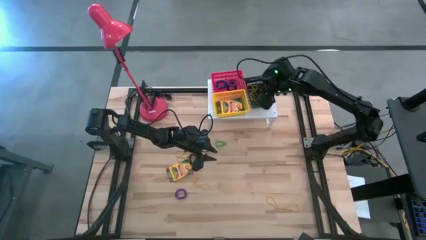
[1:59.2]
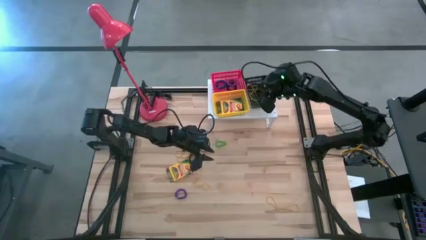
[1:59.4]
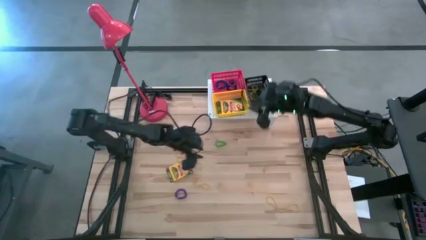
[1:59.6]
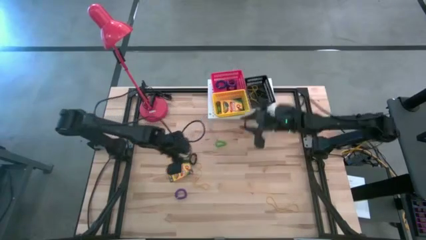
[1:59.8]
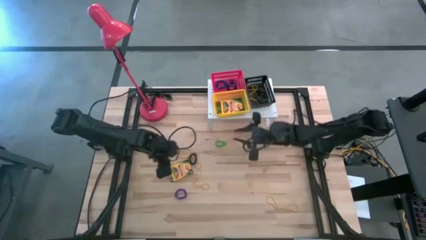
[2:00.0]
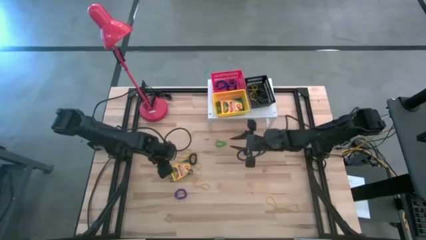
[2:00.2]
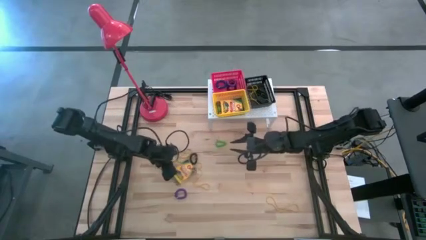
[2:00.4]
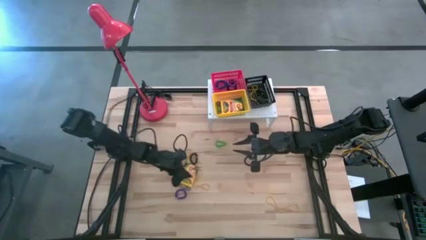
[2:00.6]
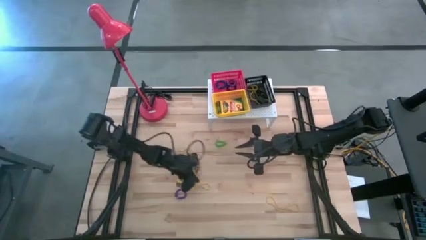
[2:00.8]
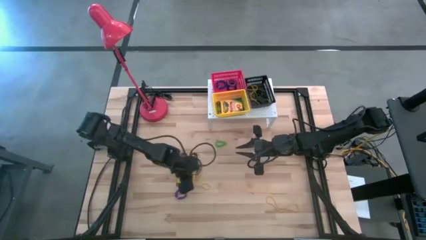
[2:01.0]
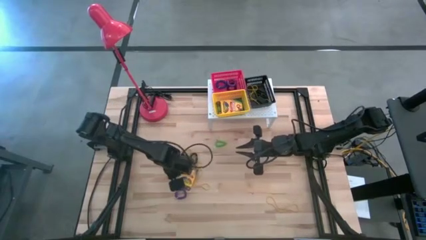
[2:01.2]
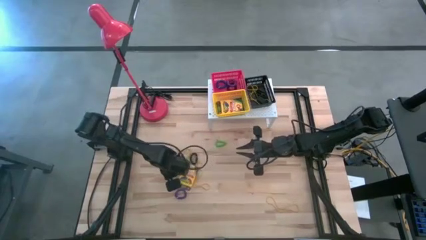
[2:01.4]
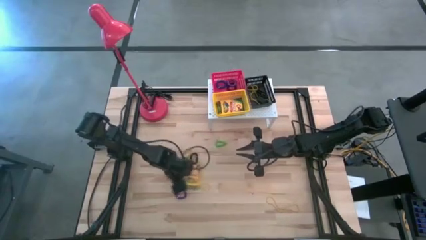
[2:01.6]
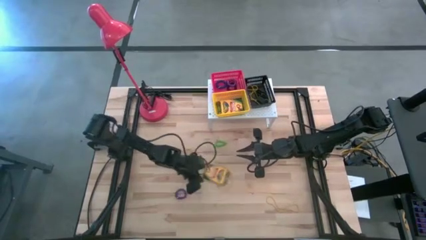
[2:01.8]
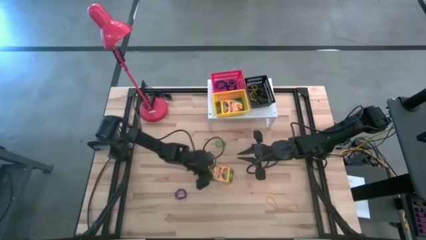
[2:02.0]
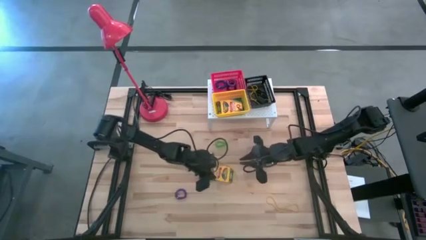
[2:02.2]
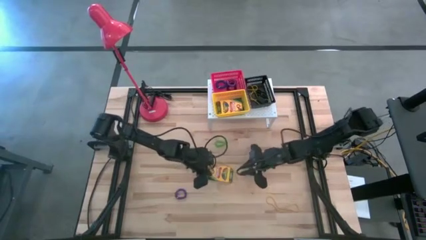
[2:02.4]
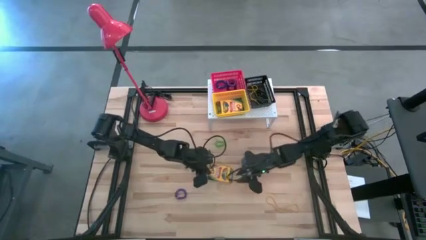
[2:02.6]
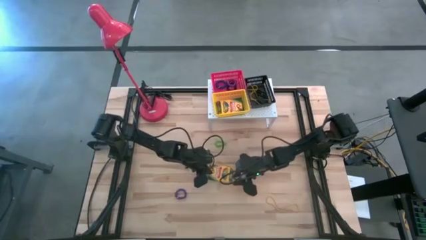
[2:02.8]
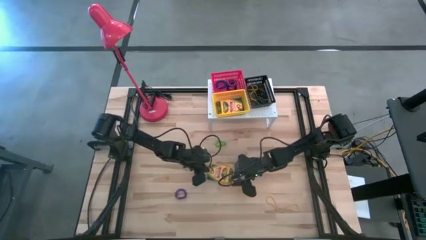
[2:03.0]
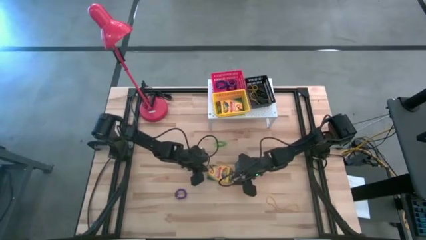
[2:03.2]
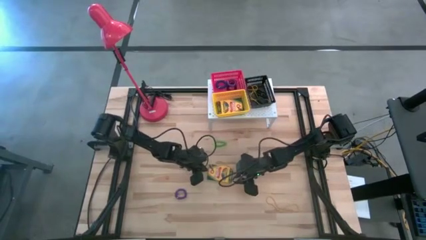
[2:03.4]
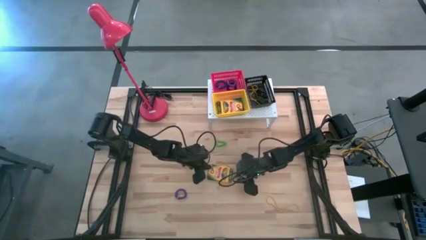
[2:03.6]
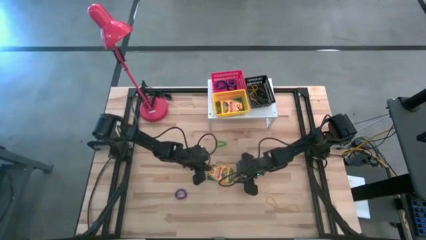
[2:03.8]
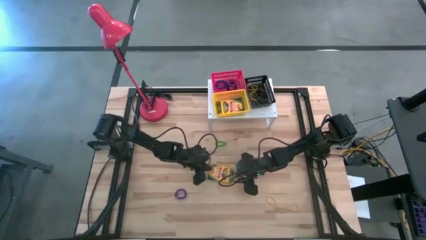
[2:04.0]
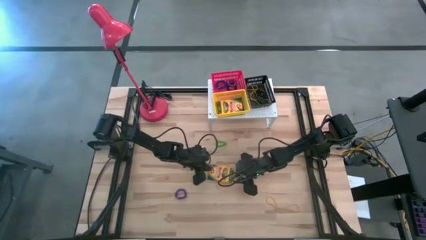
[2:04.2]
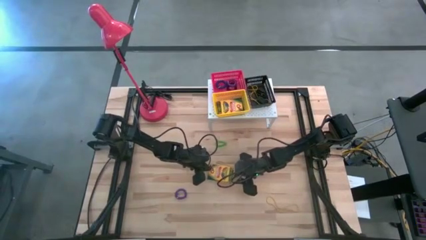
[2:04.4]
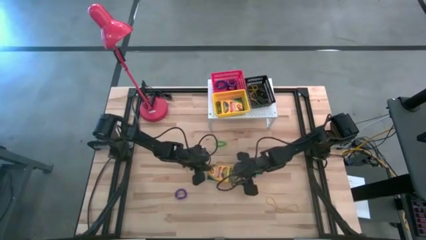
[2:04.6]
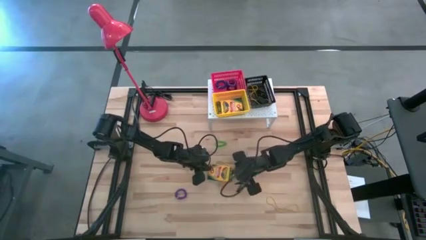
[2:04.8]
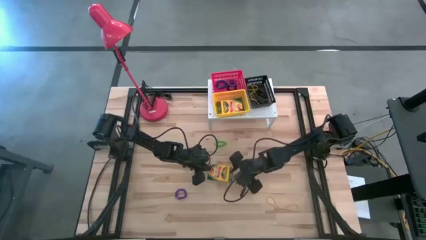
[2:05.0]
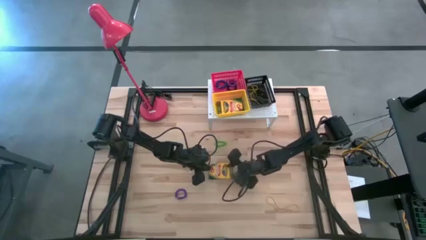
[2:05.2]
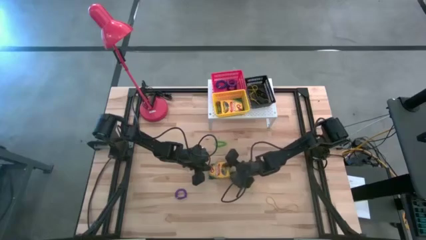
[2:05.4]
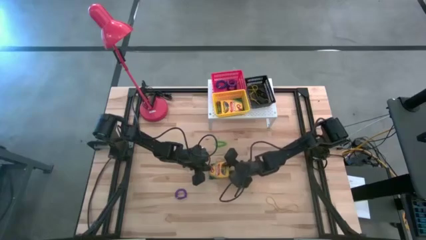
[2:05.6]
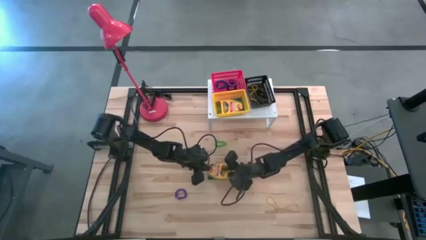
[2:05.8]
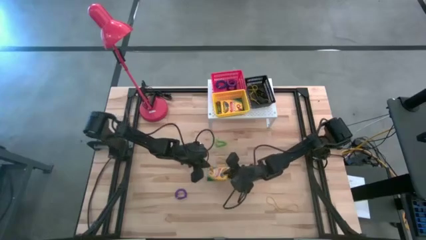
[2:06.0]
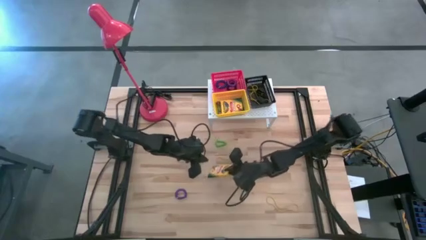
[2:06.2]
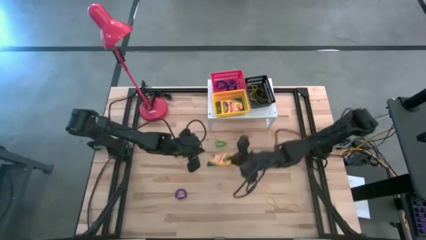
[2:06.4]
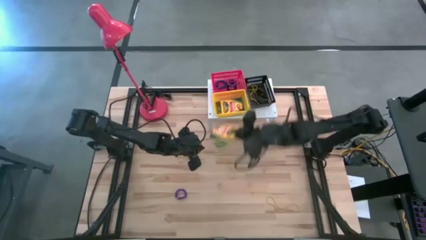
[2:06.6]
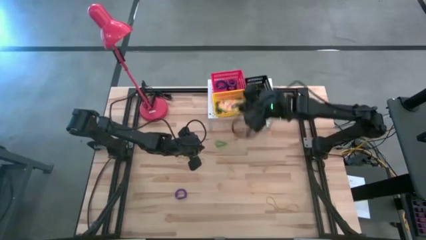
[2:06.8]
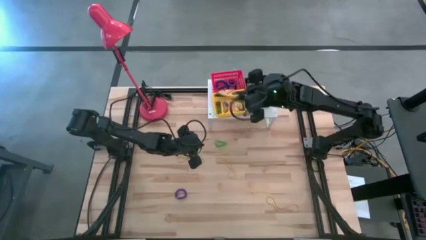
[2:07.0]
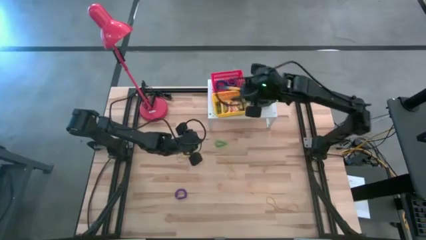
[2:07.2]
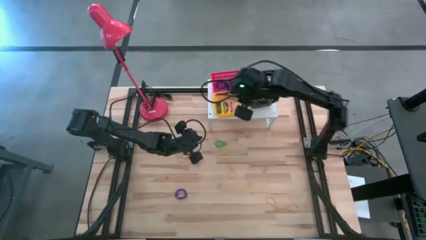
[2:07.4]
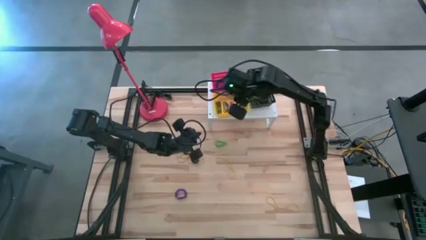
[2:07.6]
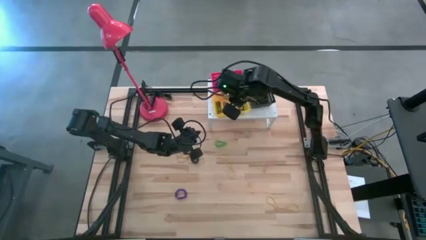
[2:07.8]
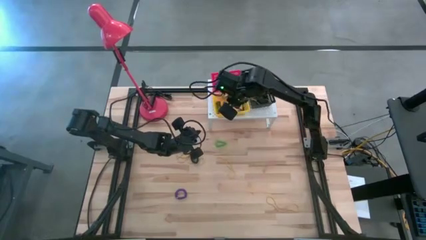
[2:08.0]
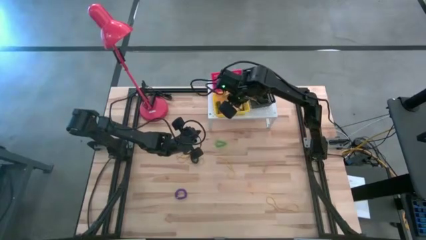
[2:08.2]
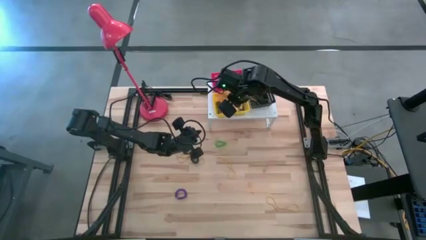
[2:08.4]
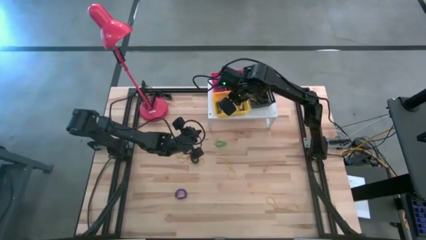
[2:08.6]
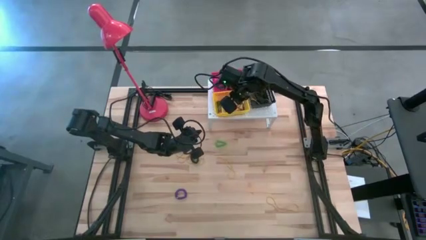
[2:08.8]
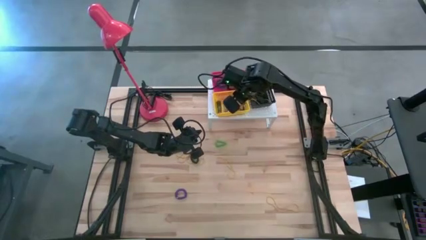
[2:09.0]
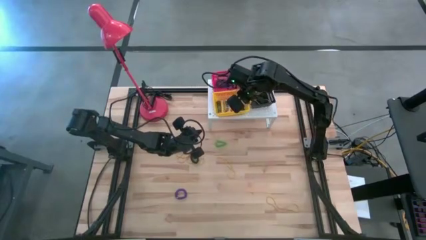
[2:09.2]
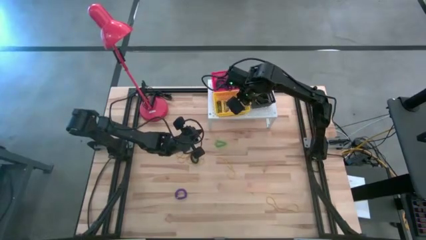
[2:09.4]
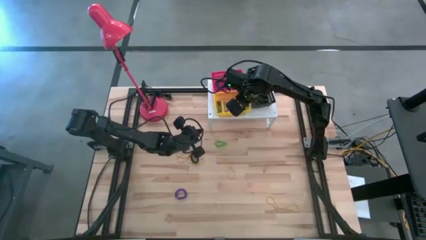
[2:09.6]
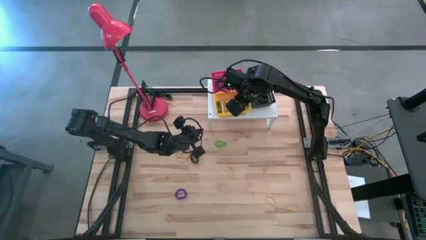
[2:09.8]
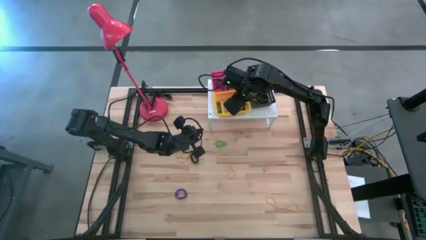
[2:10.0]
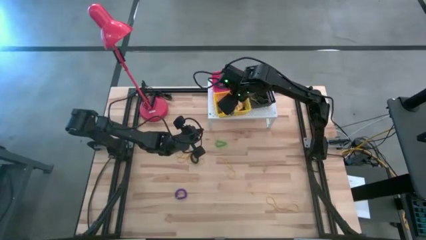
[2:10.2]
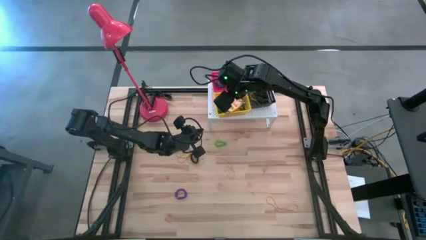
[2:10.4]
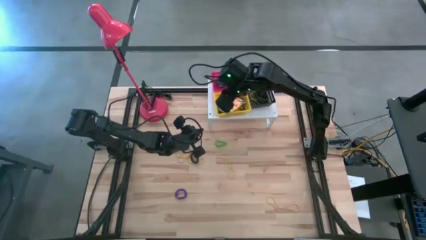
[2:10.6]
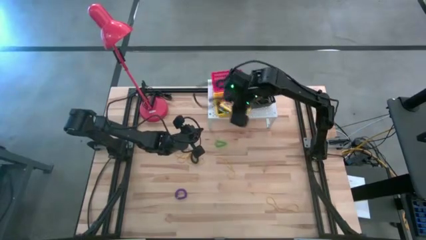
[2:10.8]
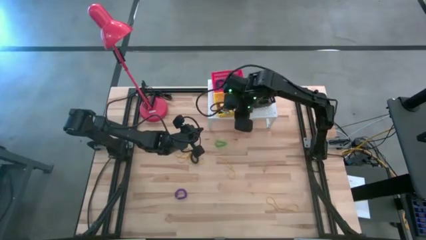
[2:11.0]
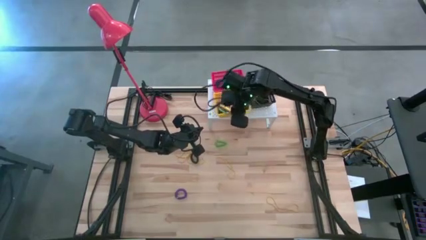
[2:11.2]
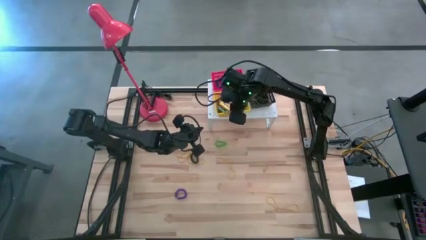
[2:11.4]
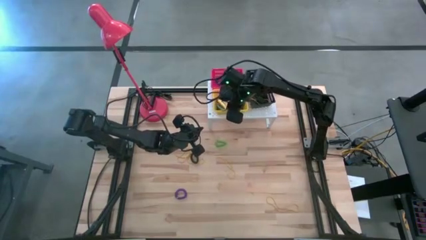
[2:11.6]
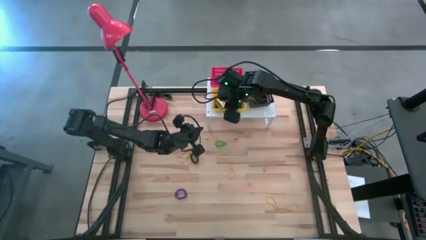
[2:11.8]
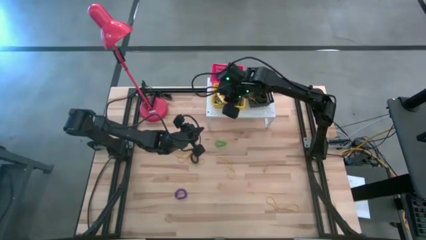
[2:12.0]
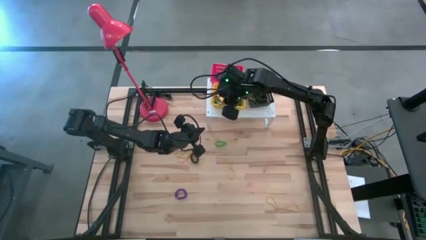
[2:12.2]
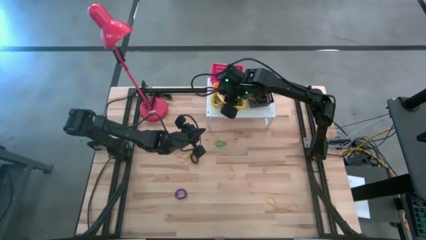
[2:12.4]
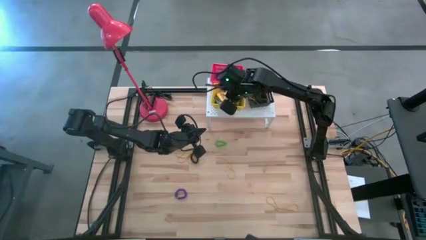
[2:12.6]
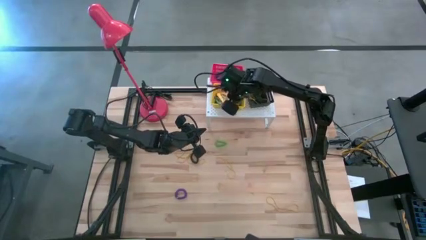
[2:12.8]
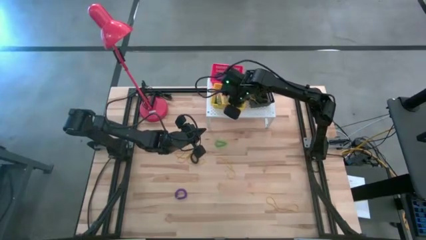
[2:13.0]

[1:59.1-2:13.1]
Task: Pick & Place Office Desk Supplies
Put the crayon box into the yellow bin on the shelf

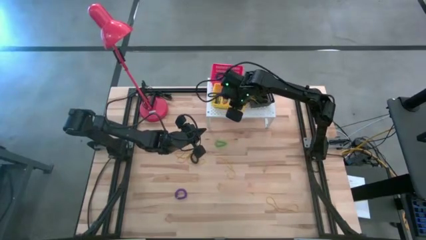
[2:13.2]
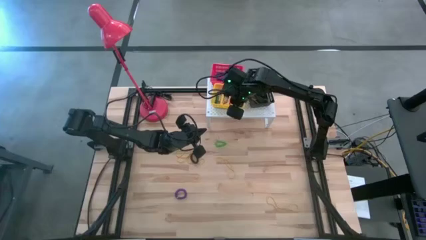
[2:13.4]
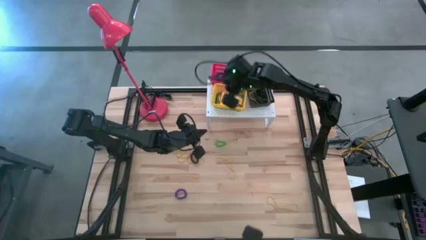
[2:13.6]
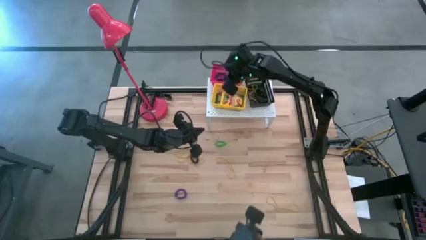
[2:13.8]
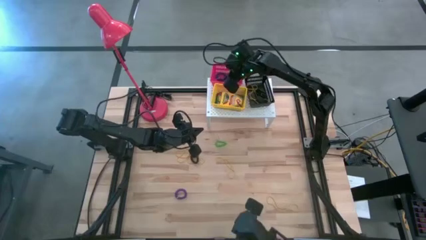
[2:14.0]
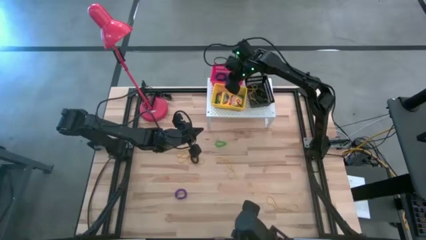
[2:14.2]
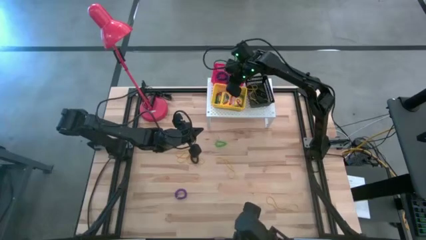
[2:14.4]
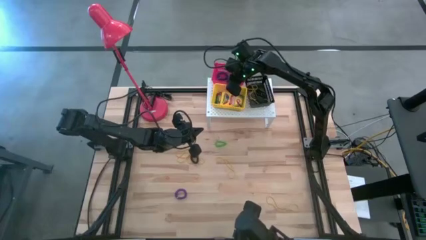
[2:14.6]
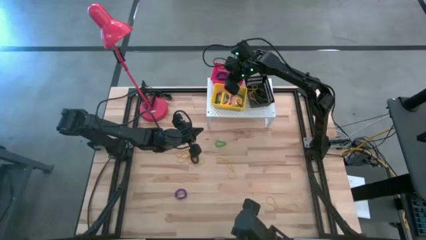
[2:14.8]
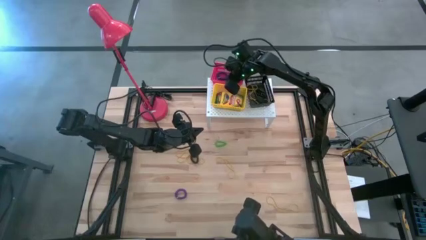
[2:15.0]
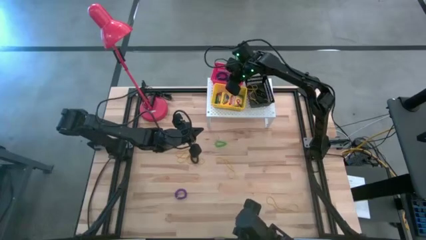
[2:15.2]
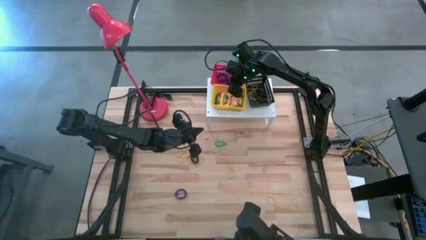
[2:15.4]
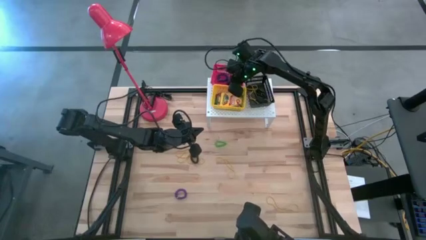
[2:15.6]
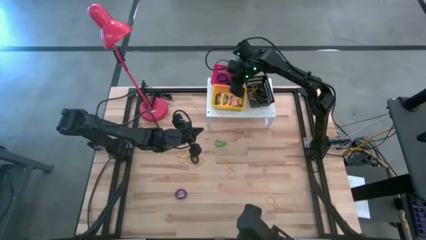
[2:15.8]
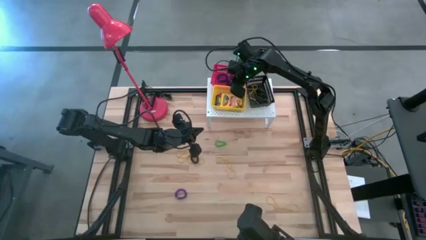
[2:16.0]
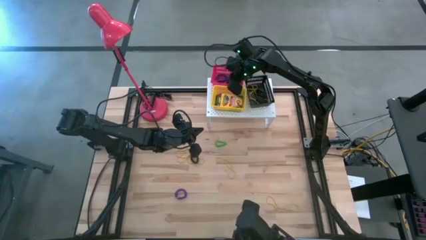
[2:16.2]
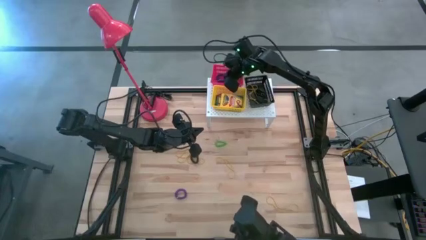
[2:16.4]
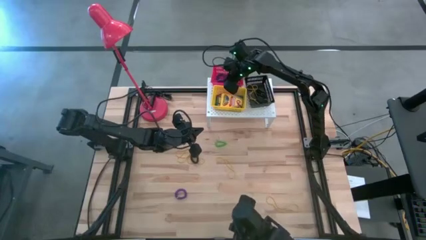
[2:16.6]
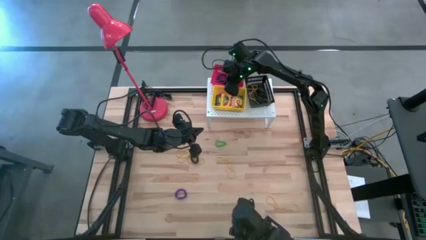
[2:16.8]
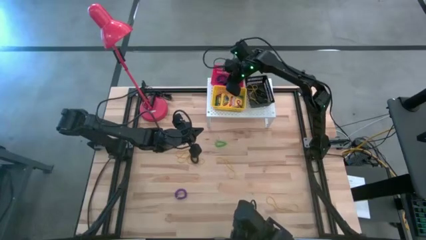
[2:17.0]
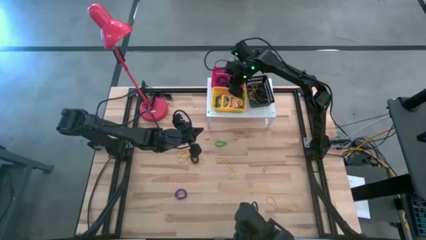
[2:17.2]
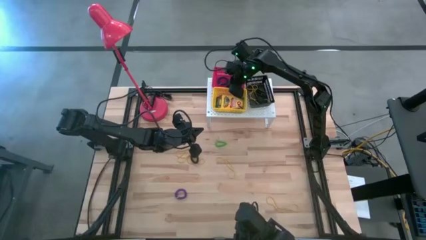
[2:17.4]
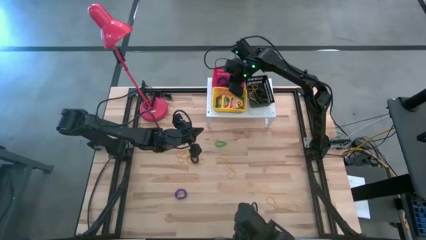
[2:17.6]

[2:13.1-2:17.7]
Adjust the red bin on the shelf
